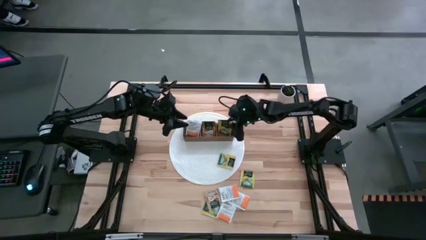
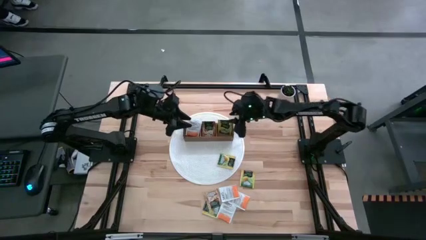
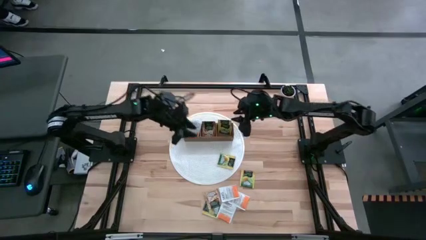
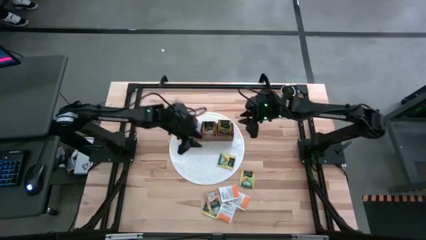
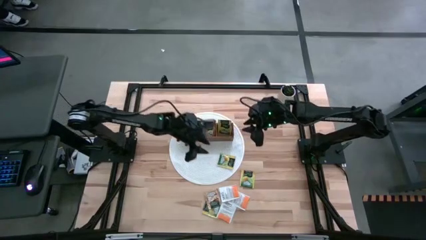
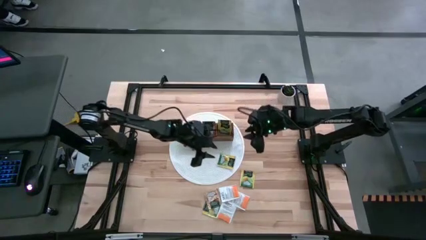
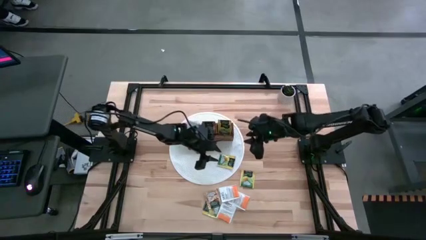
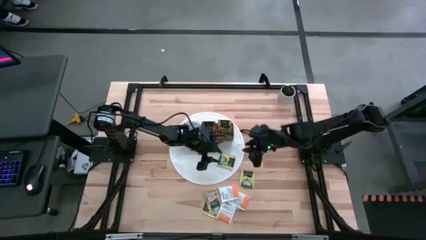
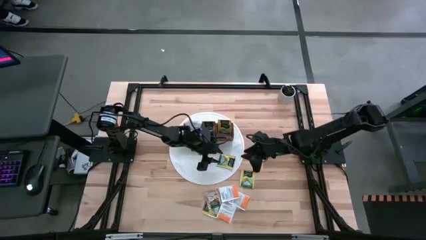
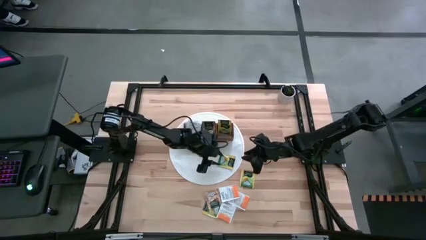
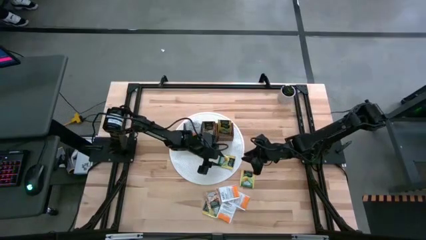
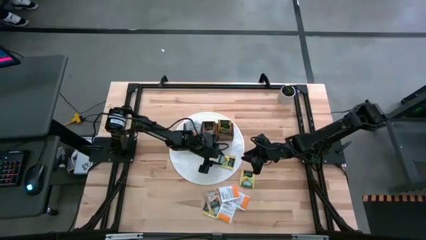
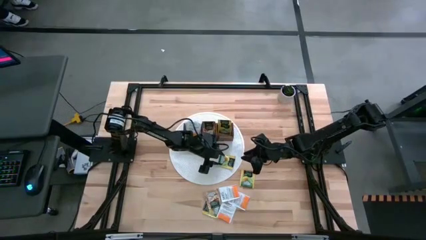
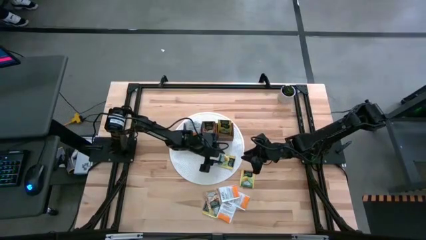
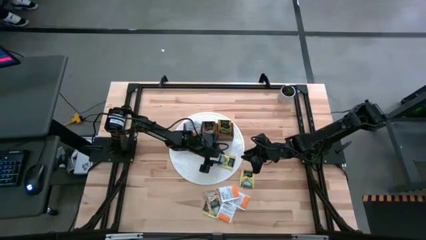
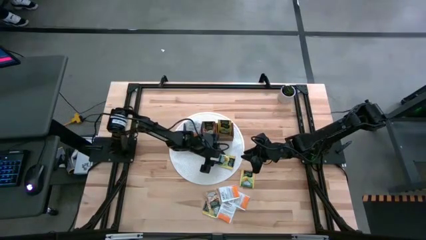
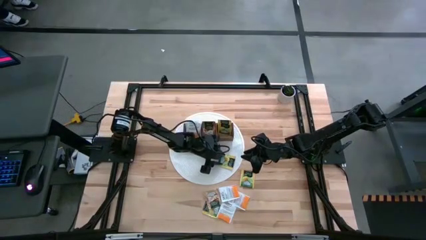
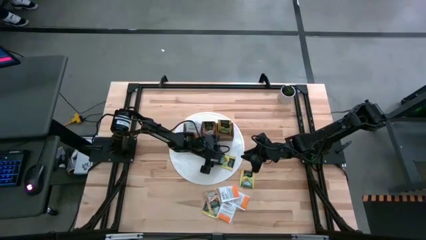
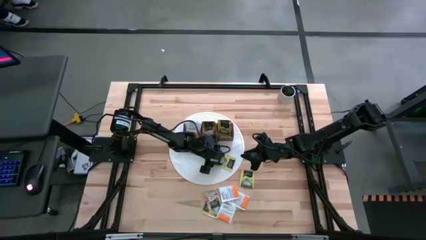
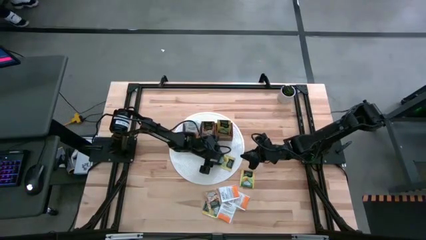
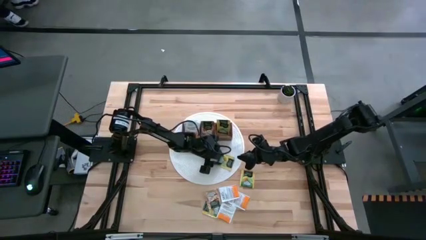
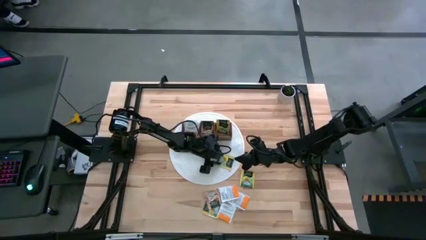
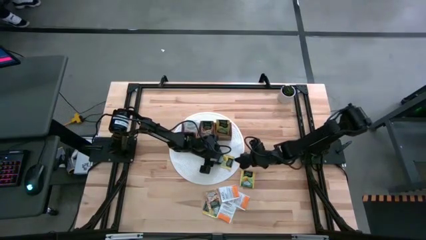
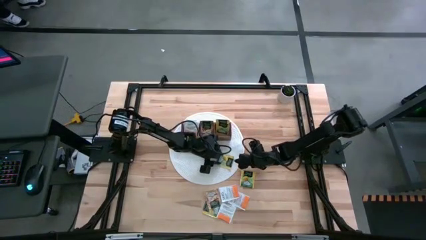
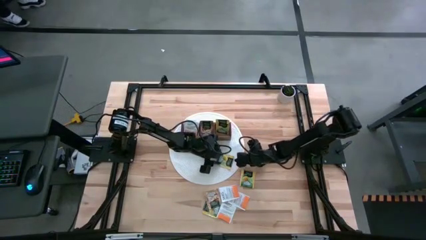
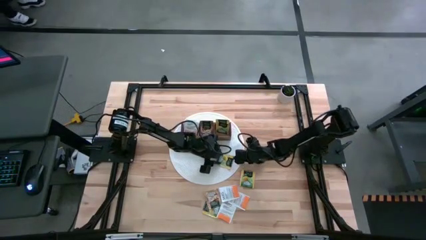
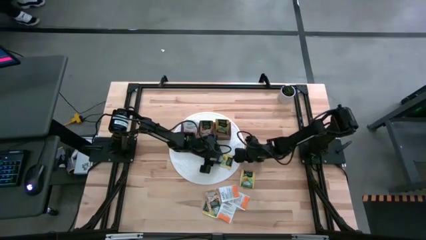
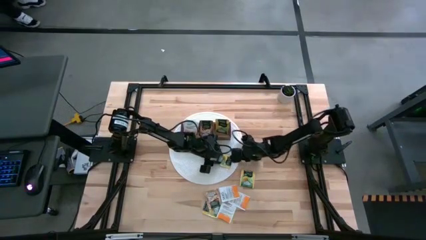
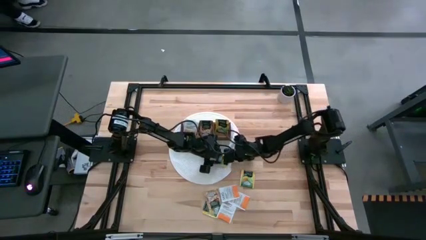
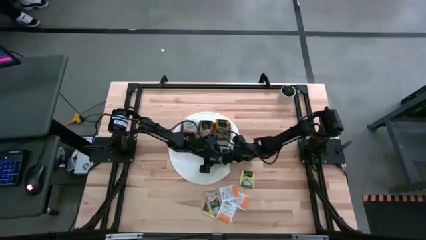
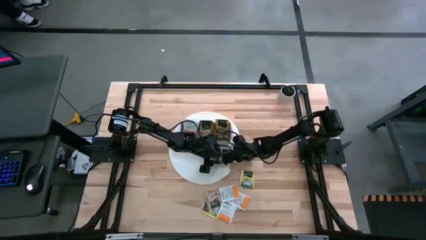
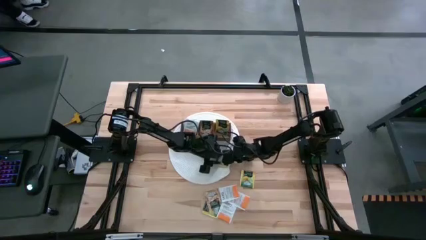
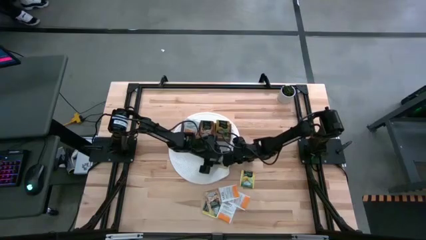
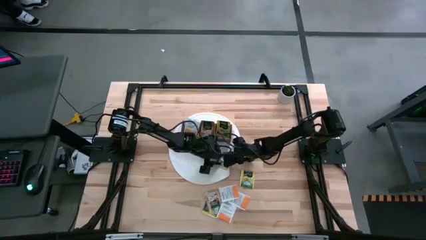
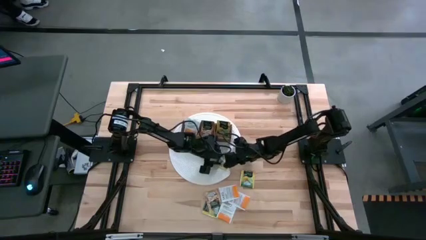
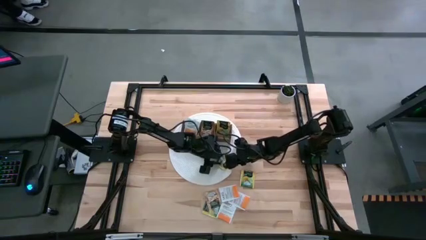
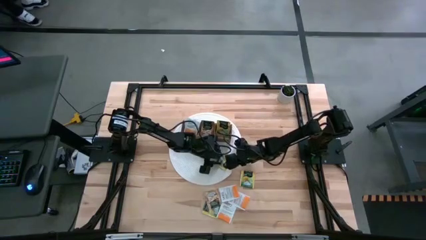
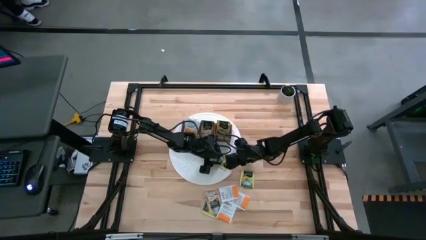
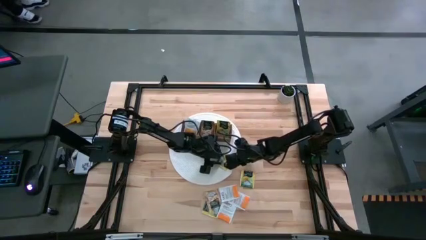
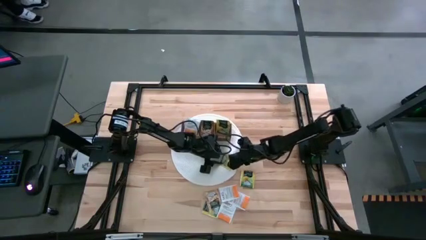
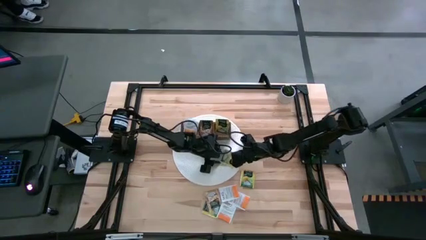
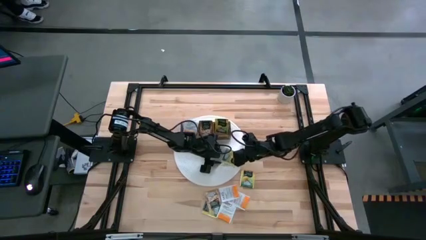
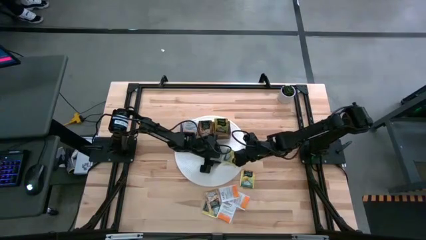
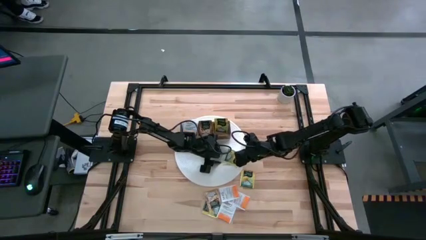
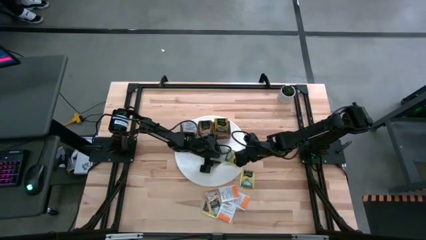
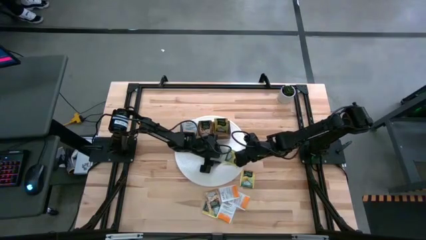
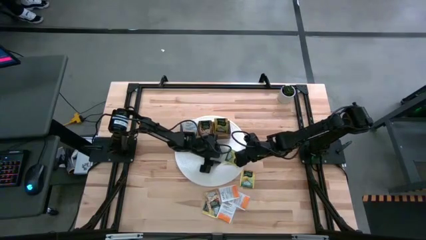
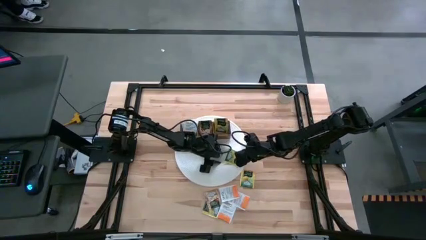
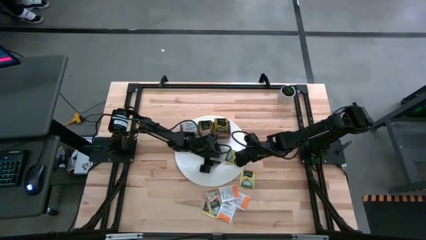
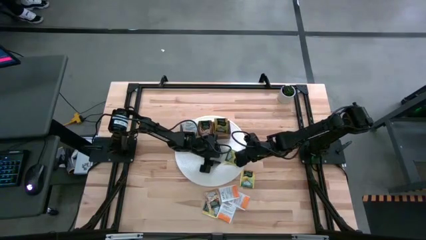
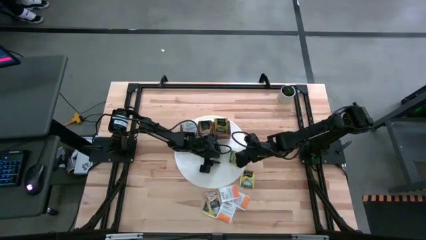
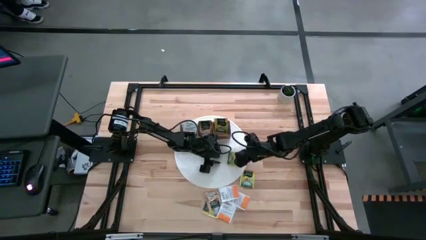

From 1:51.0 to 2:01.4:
Task: Pick & Place Tea
Put the yellow tea bag into the right section of the wooden organizer

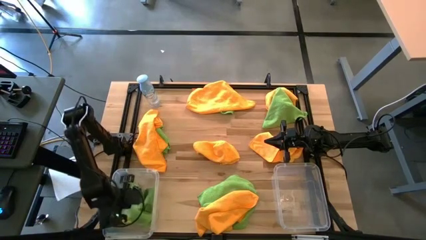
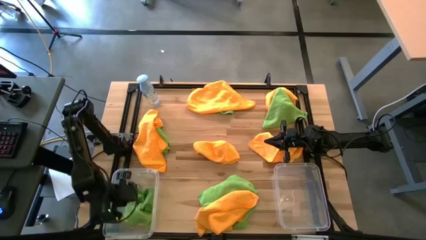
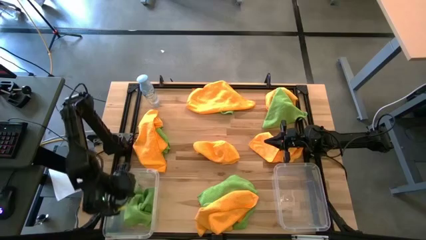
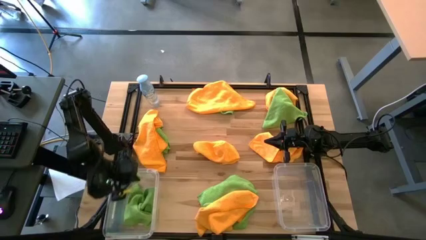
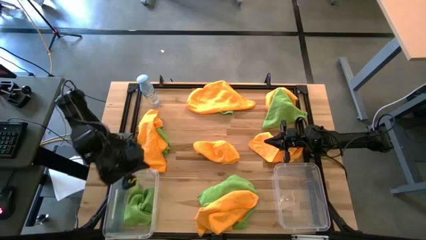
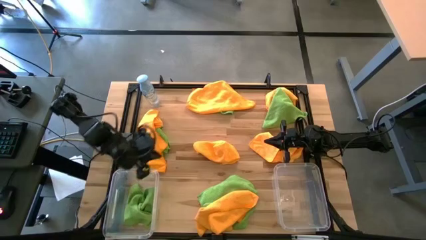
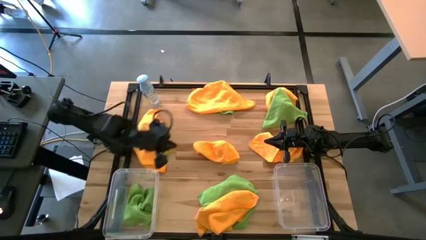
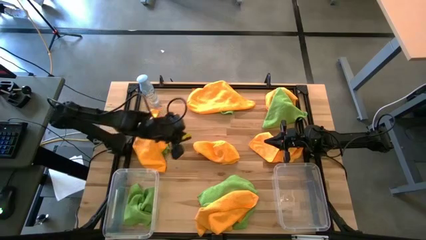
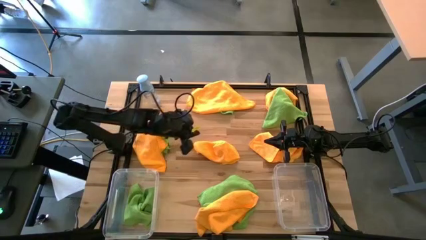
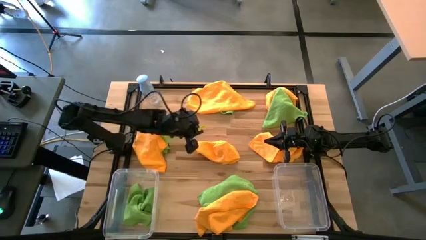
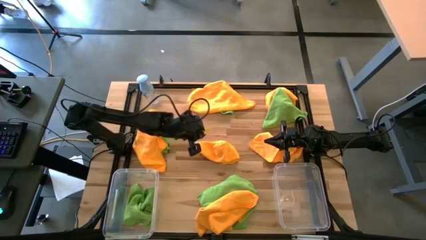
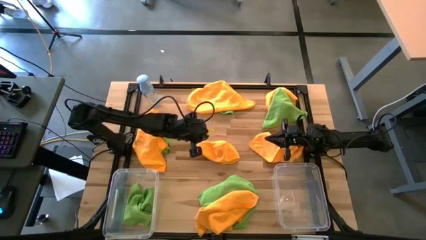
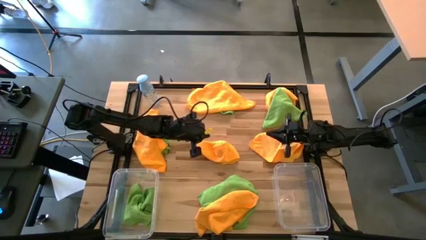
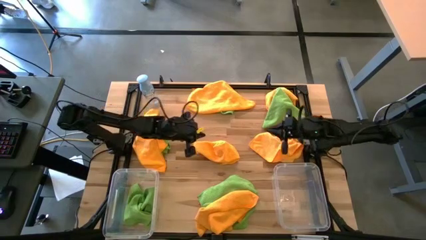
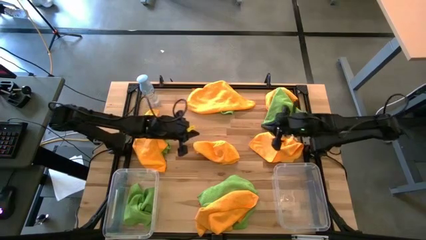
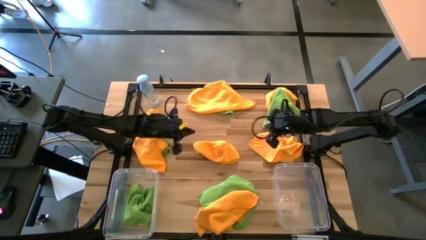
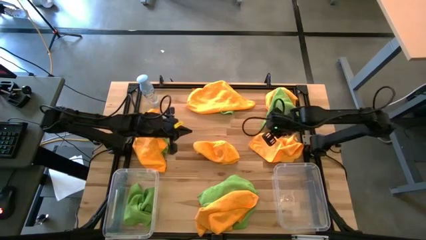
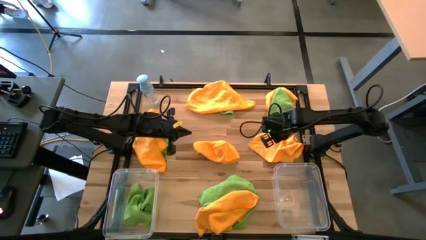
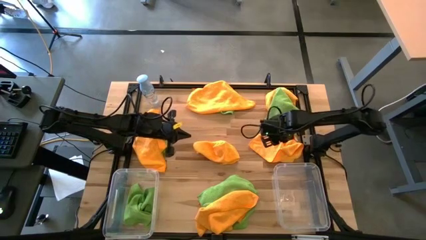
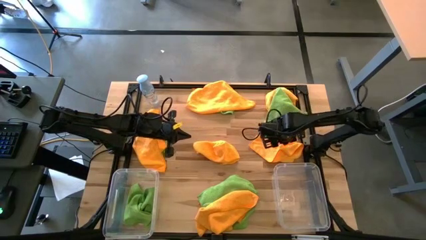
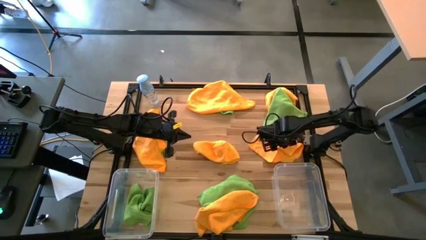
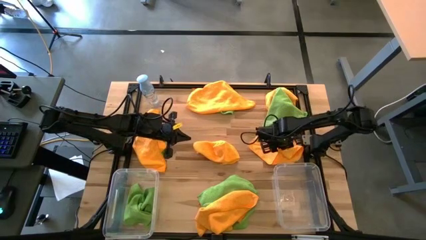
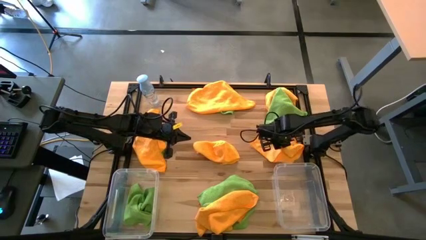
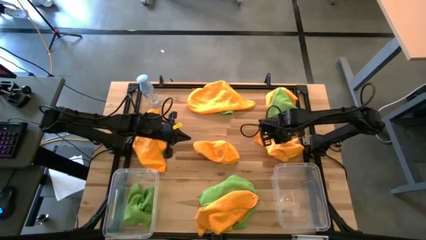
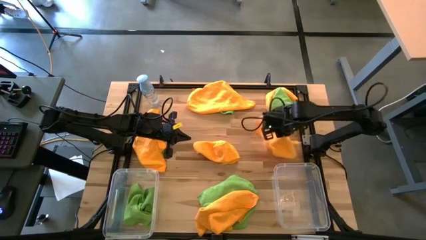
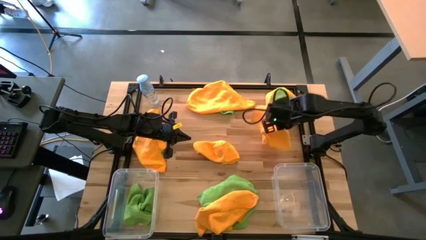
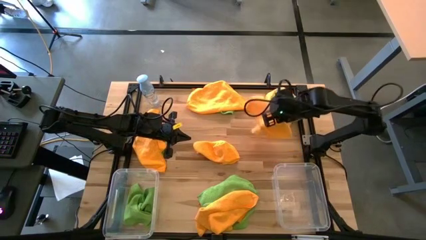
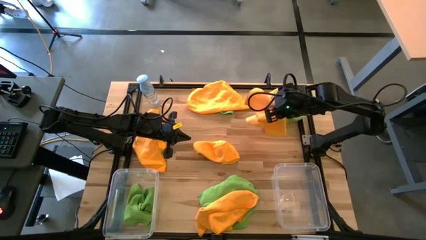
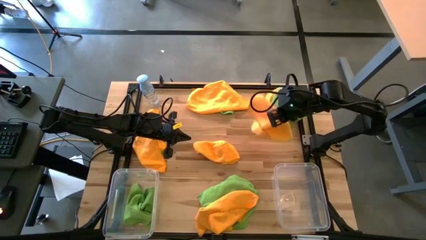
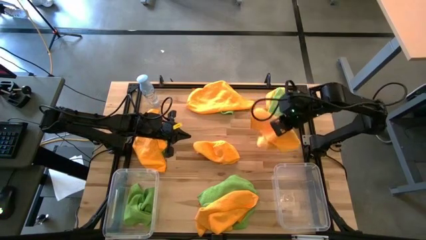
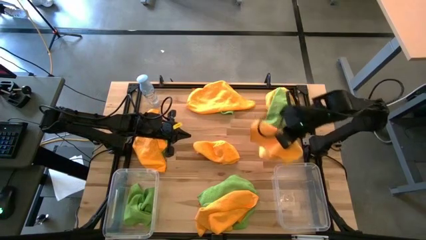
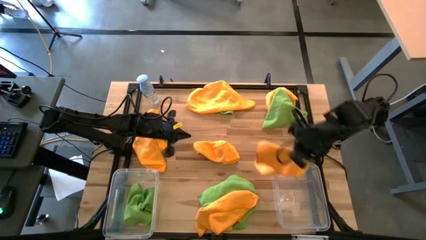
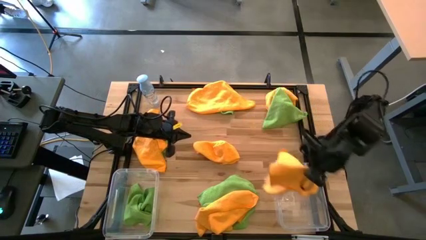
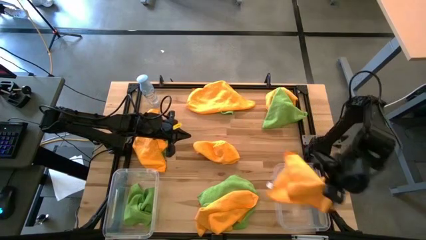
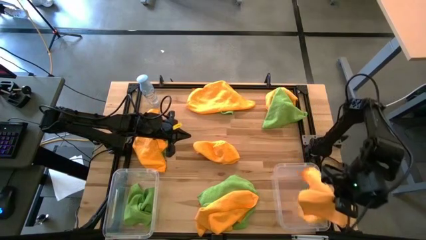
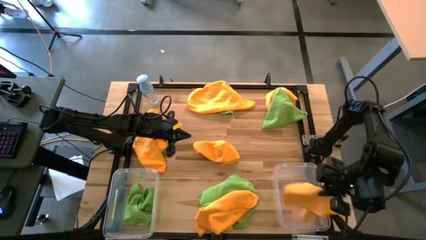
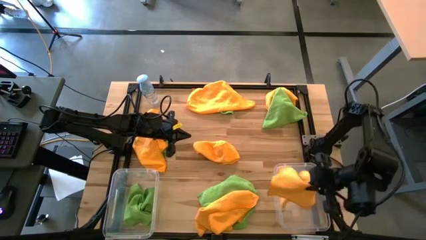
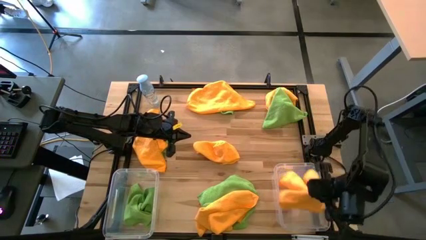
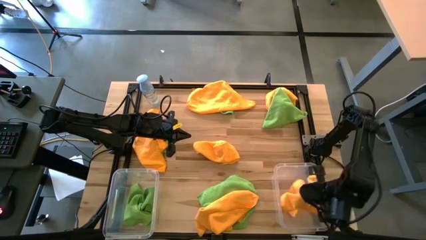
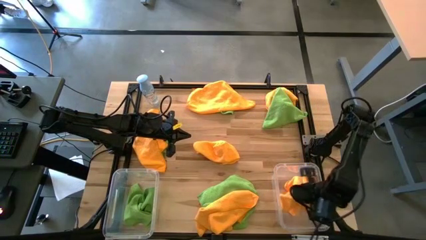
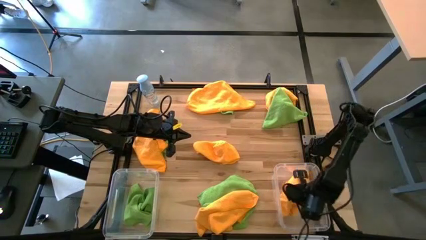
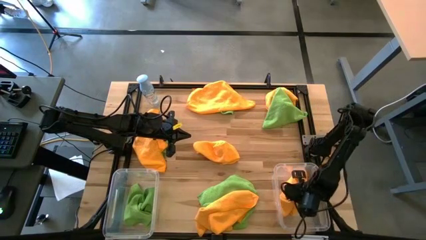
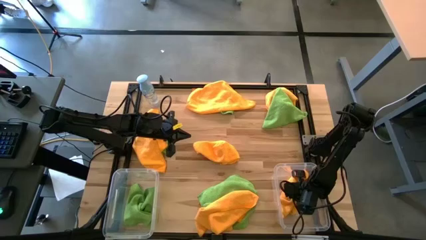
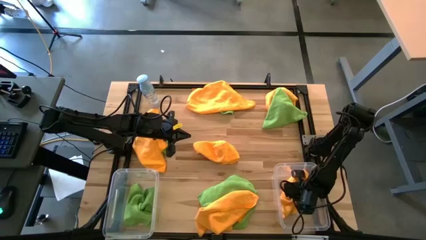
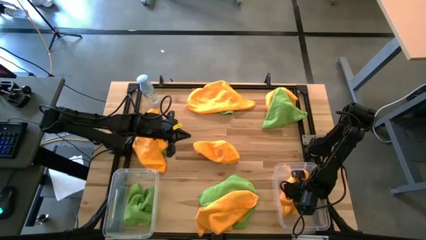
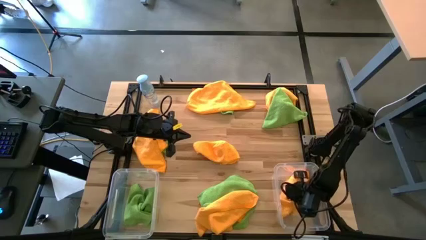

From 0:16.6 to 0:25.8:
Task: Sort microfiber towel by color & place in baskets
Put the yellow towel into the right transparent bin
